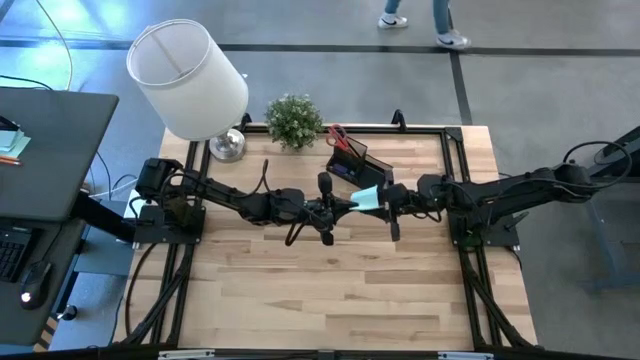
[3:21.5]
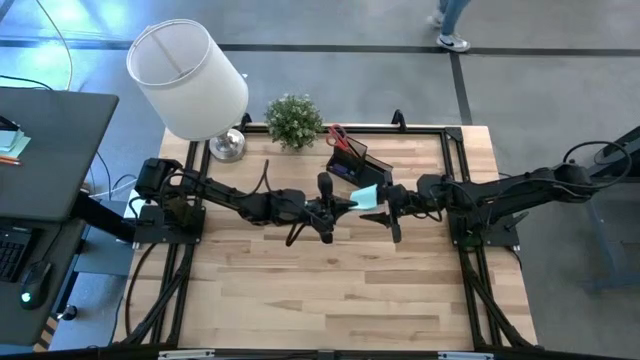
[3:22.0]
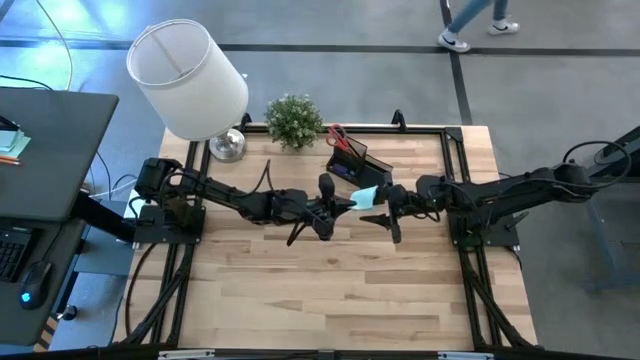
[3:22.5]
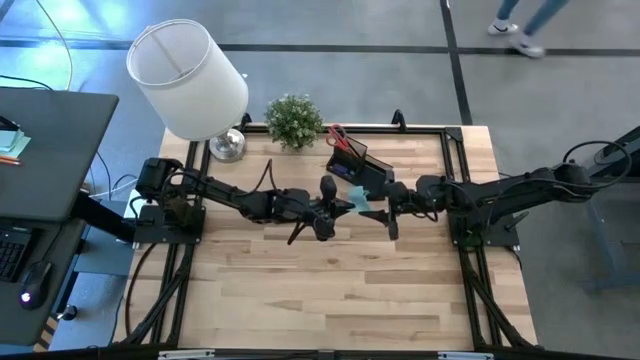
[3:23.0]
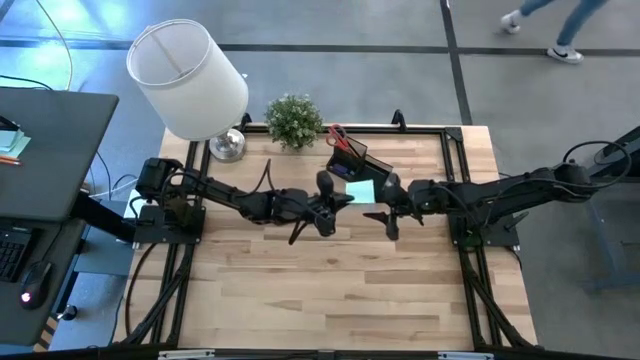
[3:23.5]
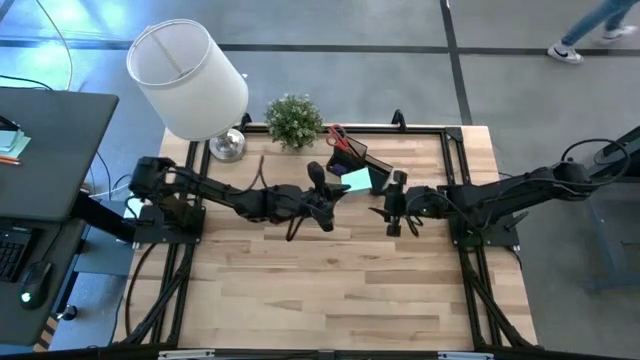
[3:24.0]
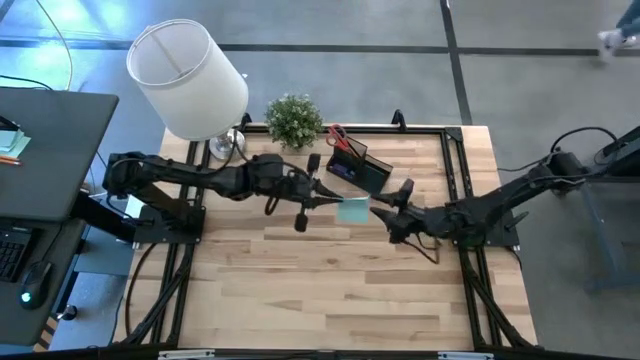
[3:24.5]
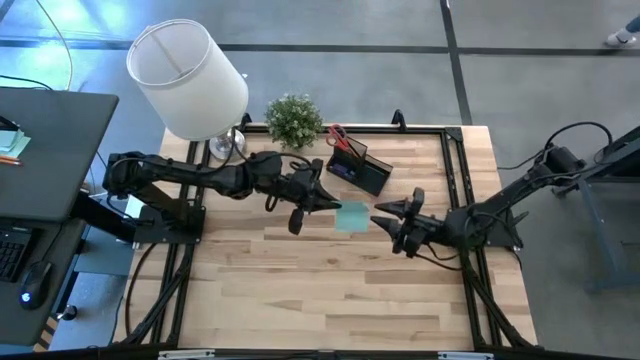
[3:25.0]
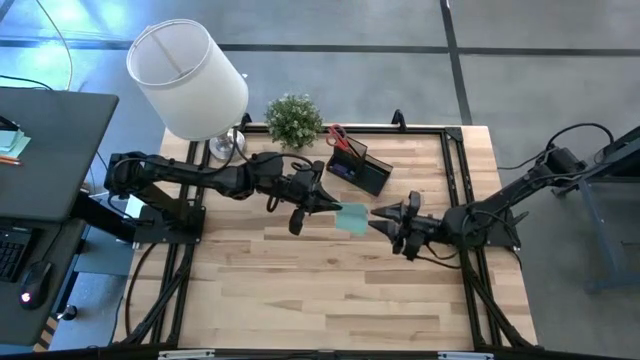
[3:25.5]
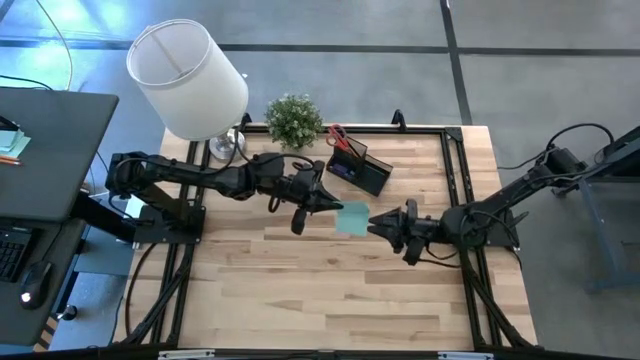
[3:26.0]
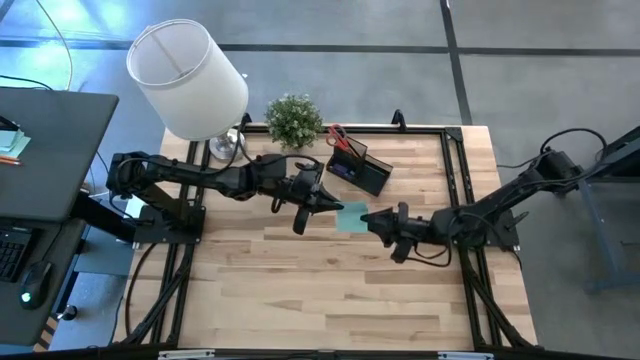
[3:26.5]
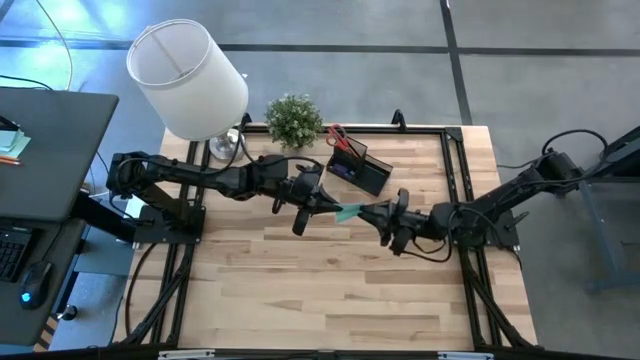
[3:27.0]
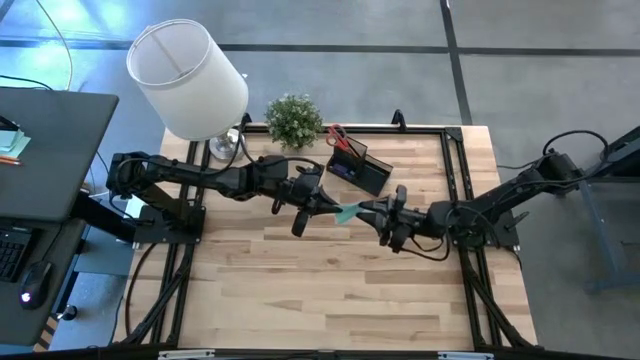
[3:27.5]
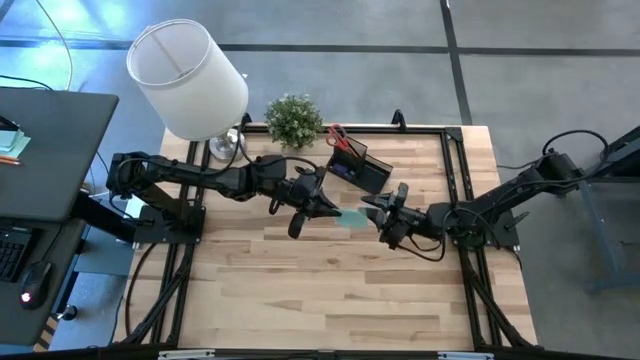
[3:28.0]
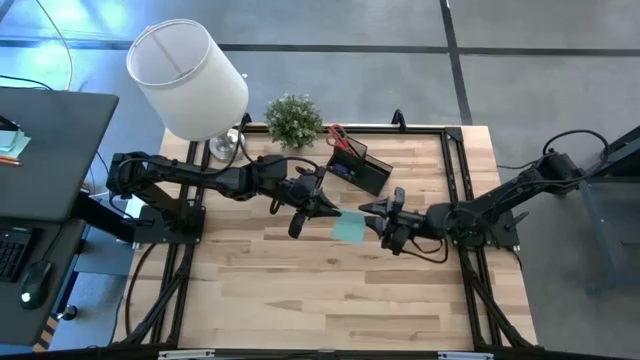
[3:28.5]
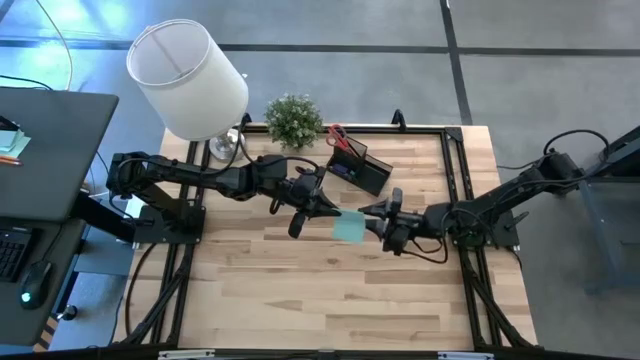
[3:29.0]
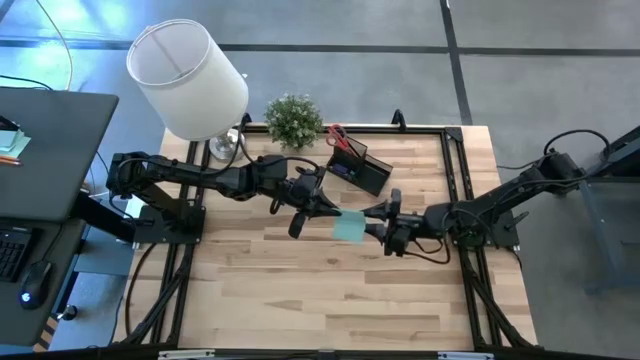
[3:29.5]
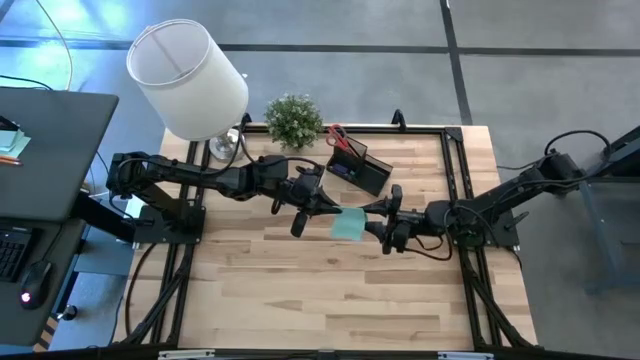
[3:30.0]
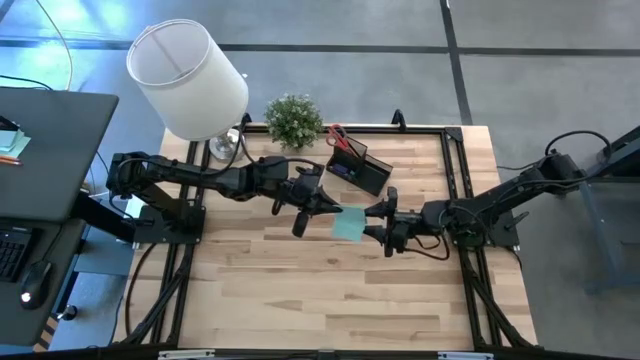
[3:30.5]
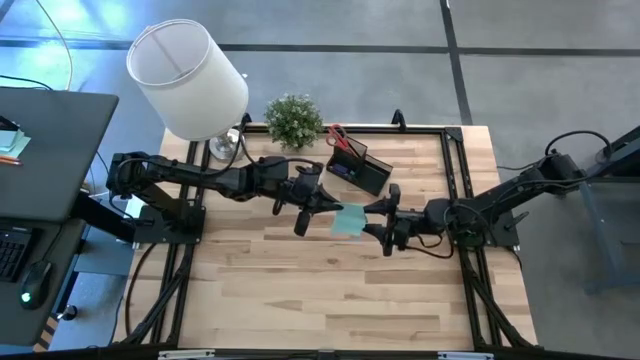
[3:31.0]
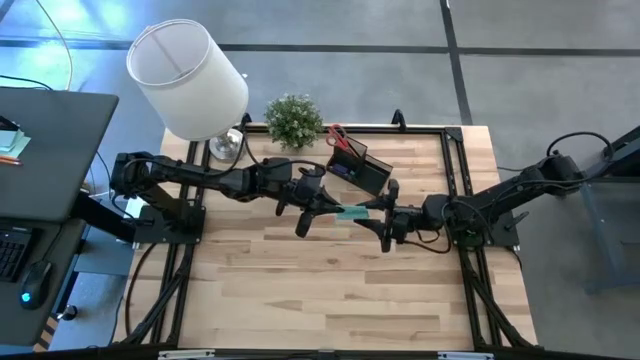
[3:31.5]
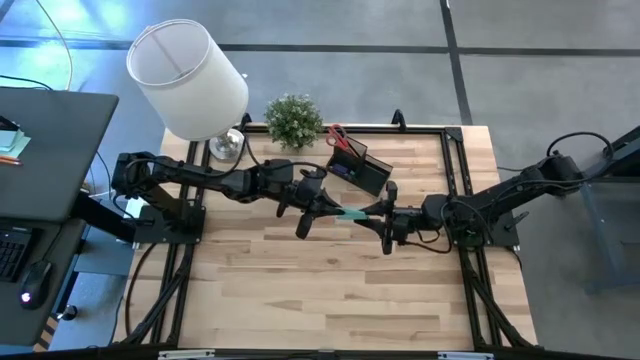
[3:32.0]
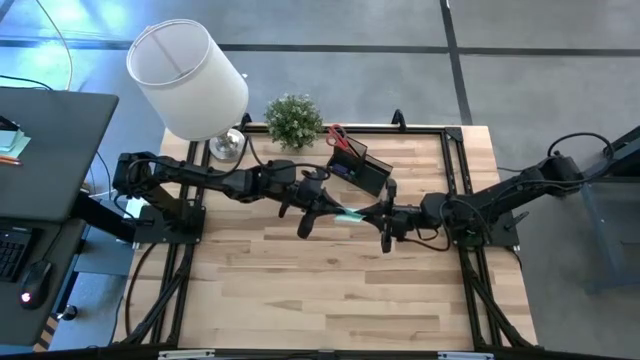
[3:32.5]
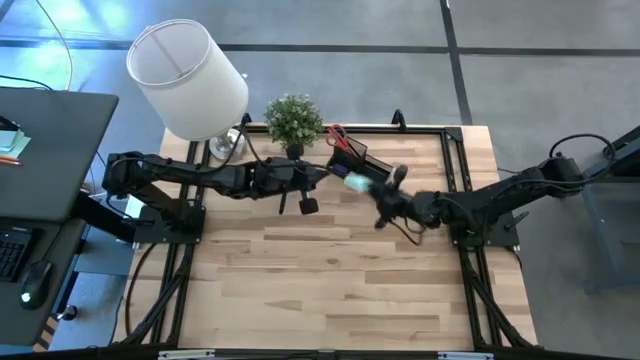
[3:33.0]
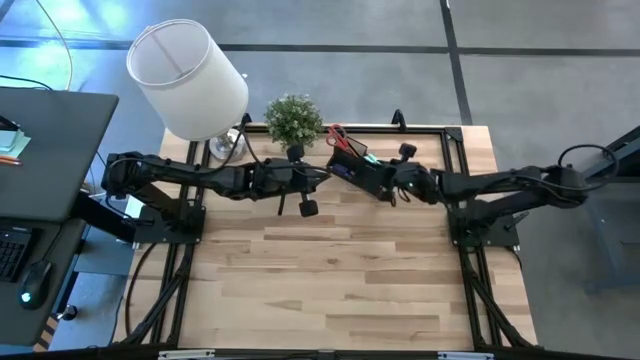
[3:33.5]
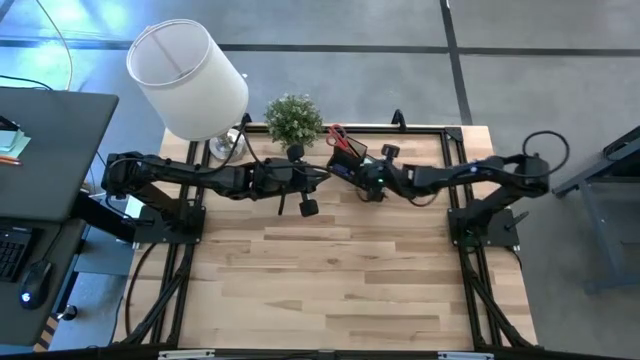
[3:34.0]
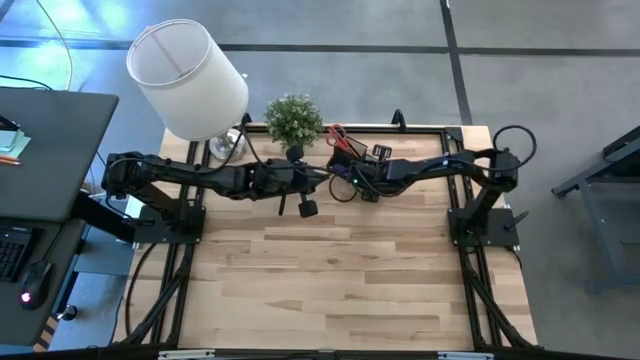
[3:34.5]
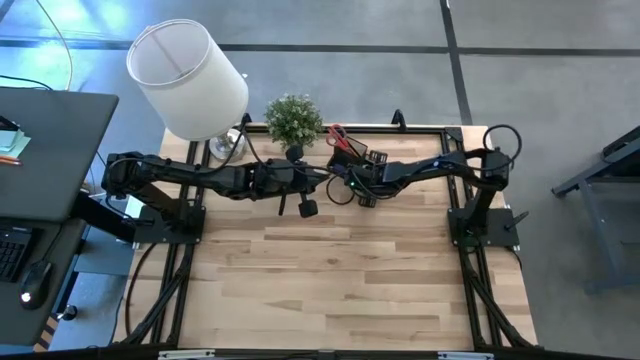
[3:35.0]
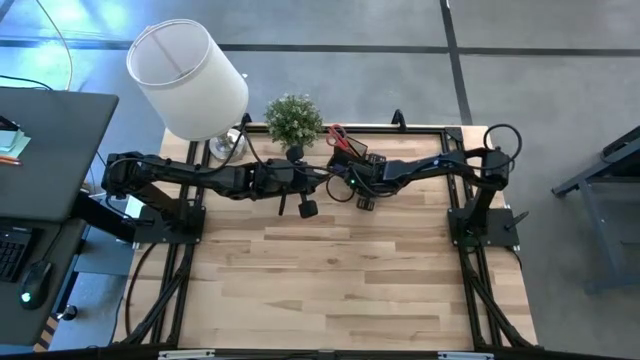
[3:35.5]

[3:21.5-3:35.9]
Task: Pick and place office supplies into organizer
Put the blue sticky notes in the black desk organizer

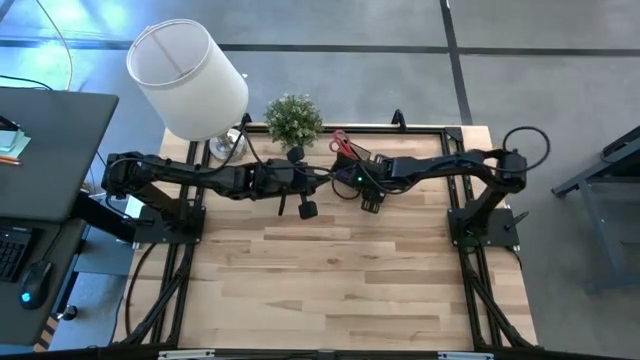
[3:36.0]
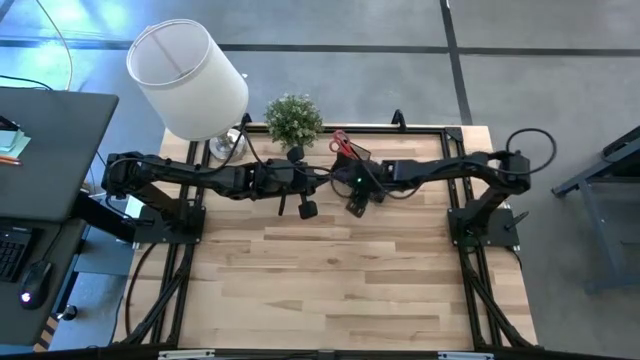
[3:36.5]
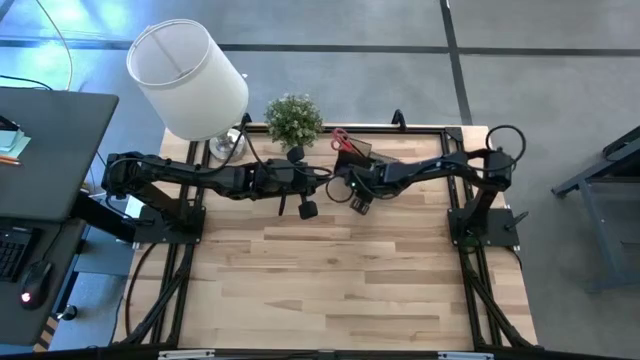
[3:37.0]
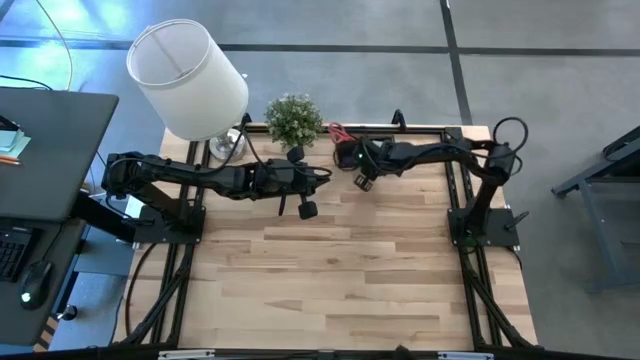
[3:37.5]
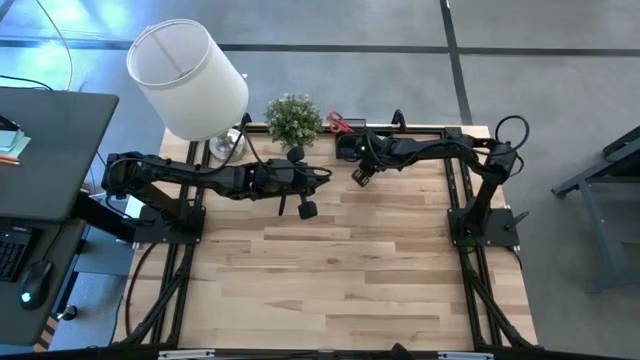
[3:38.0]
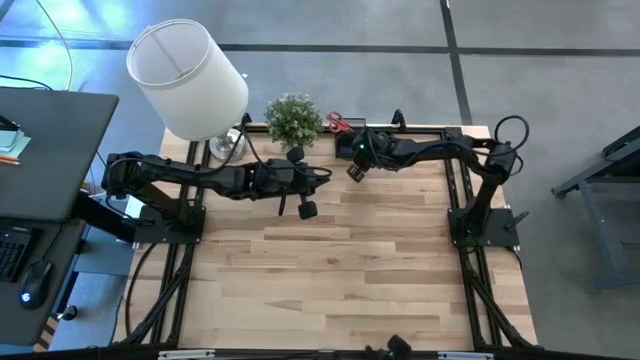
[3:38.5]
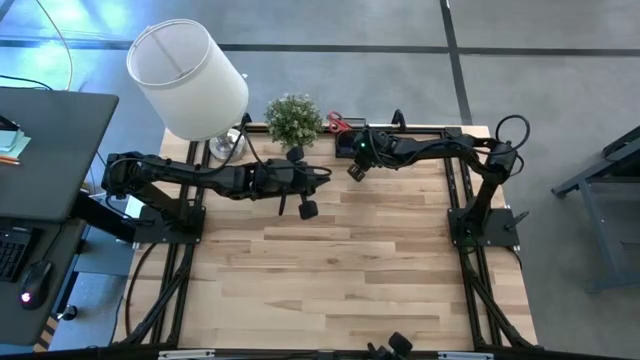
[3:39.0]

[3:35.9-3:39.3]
Adjust the black desk organizer

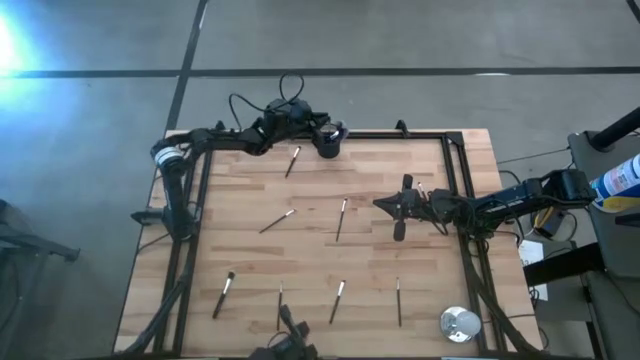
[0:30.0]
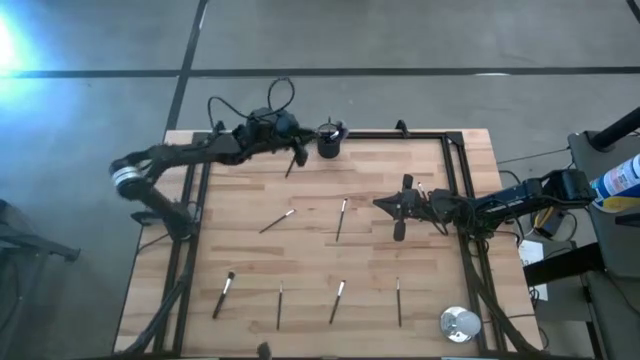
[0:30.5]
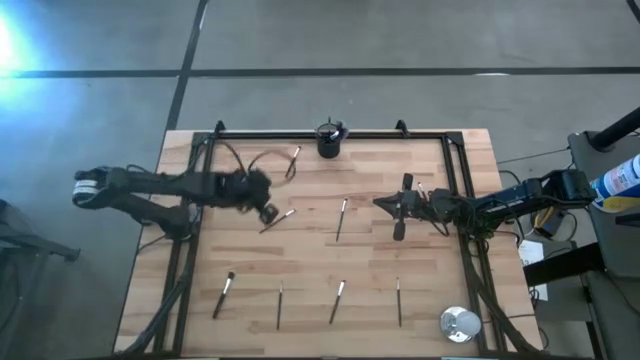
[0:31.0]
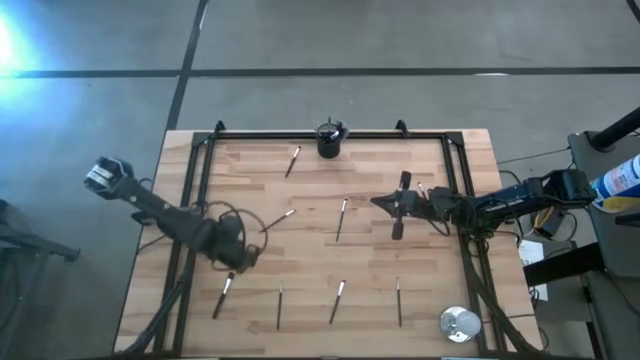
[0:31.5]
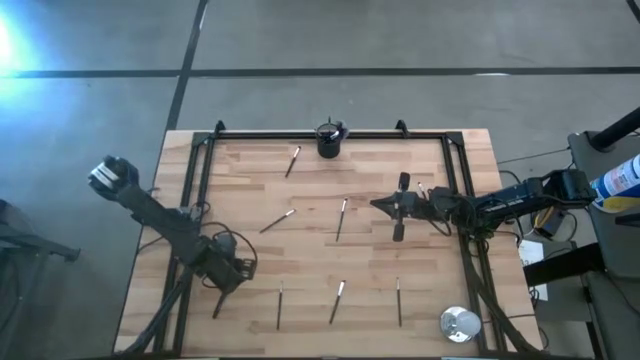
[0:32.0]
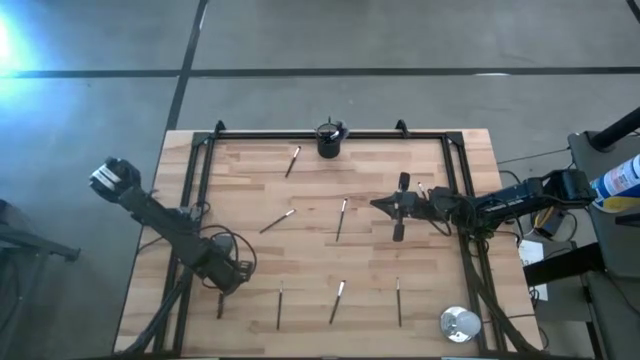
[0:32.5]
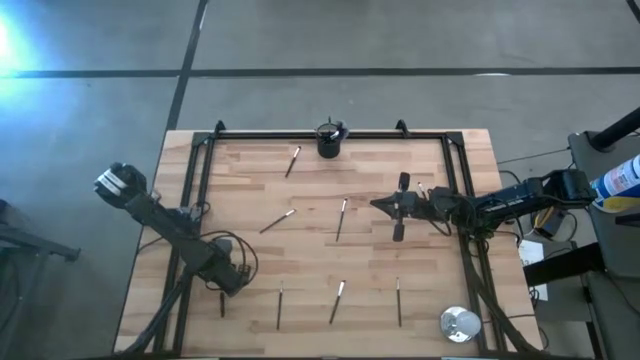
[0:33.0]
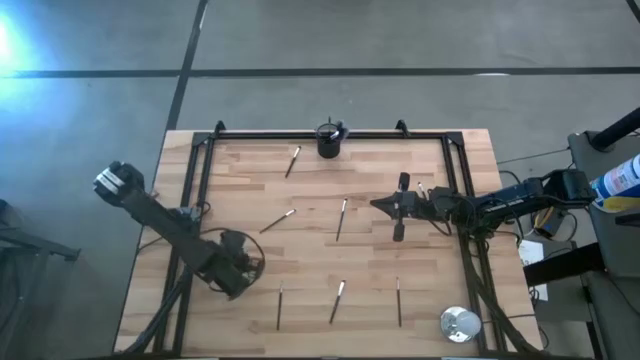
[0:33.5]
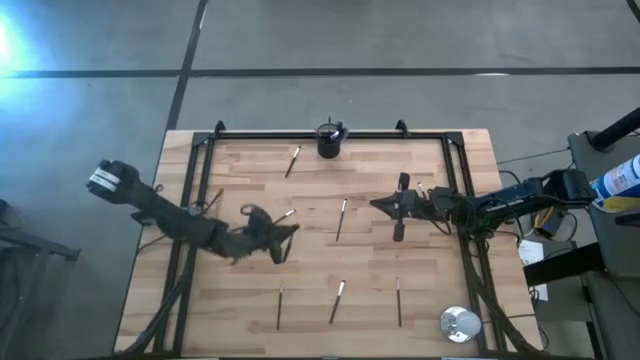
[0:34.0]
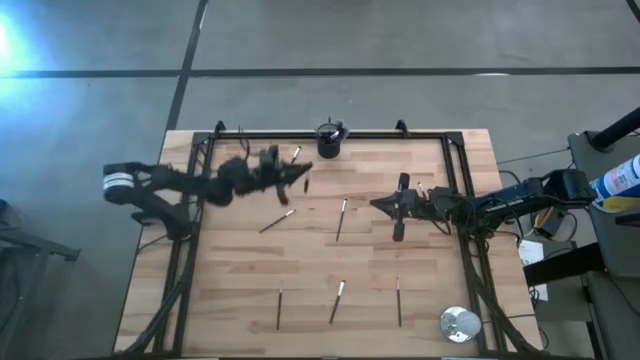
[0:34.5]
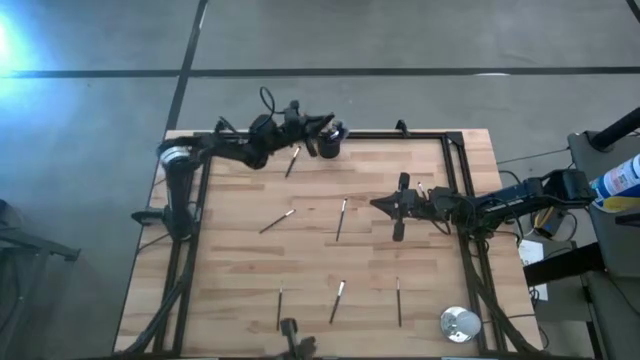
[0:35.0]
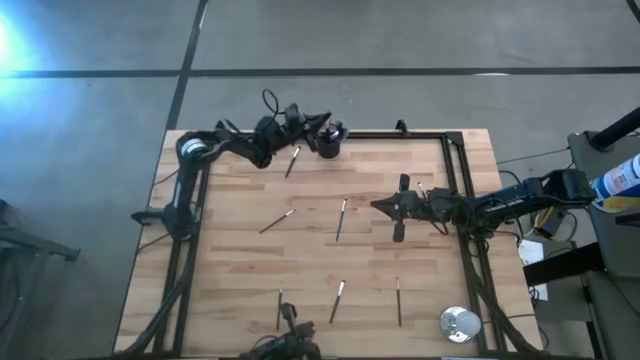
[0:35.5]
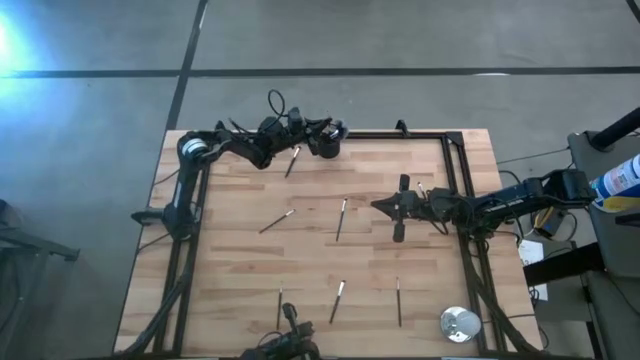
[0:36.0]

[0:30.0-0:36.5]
Task: Put items in baskets/containers
Put the black foundation brush into the black pen holder
